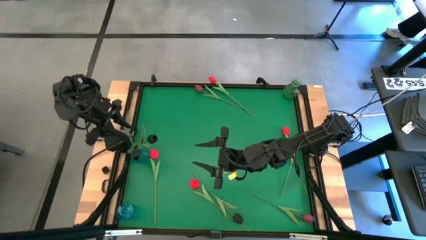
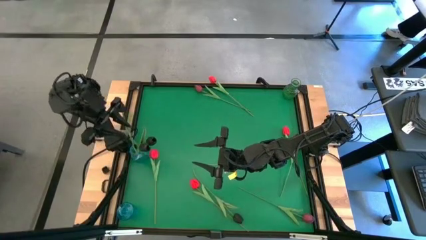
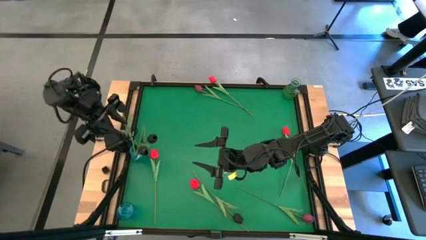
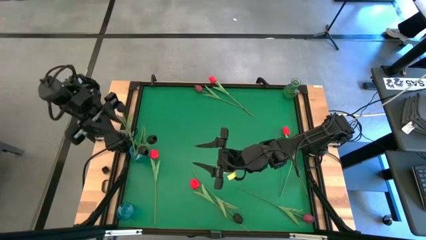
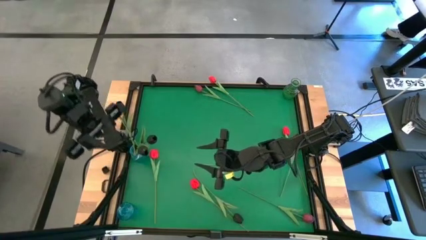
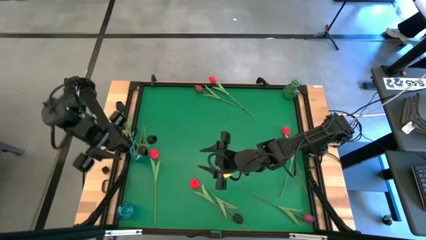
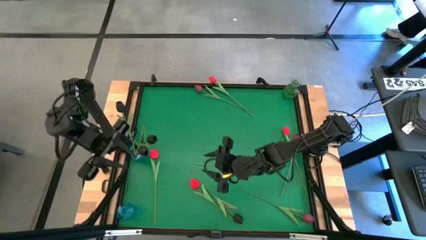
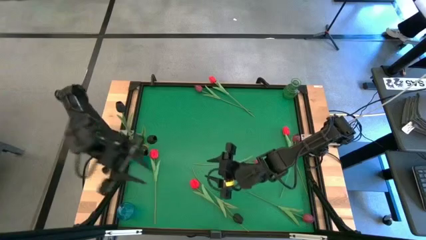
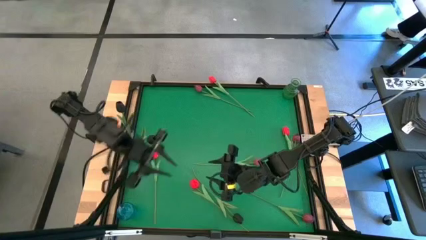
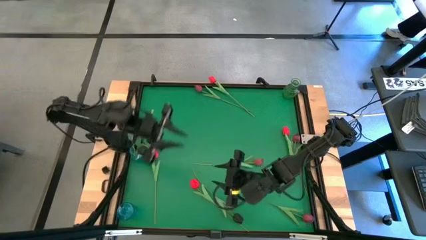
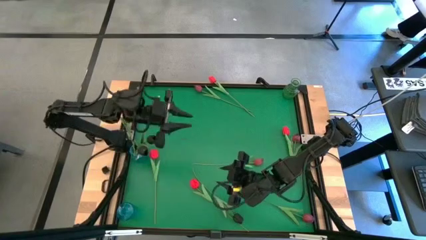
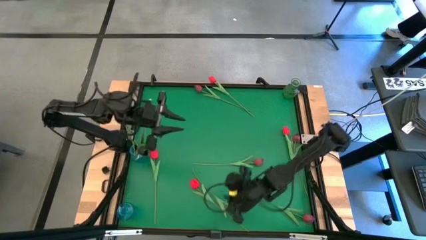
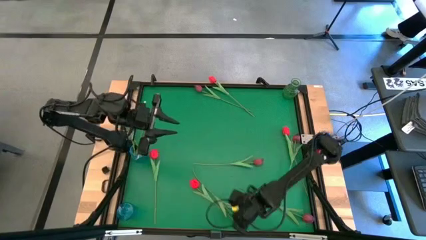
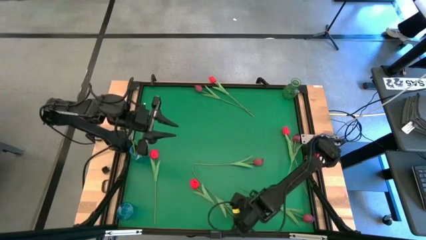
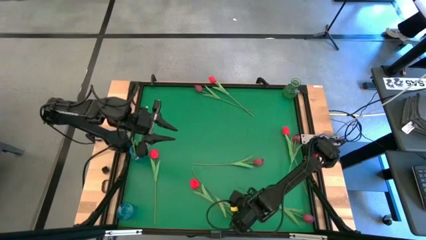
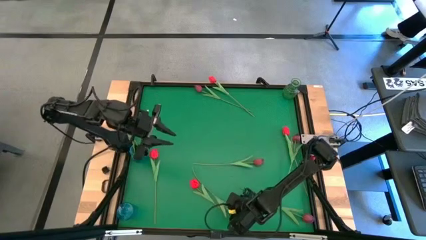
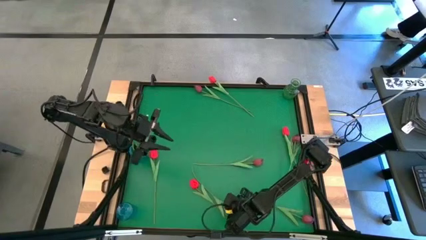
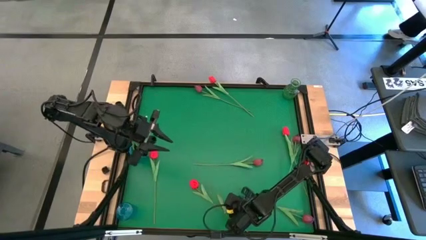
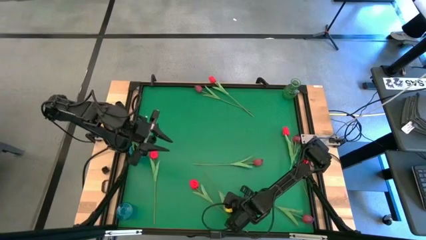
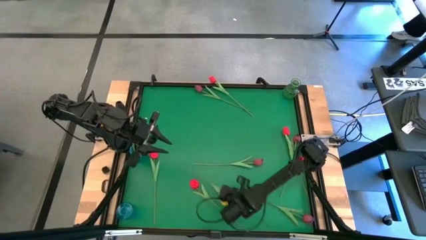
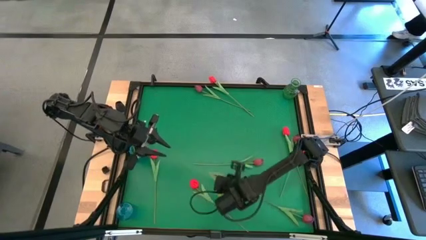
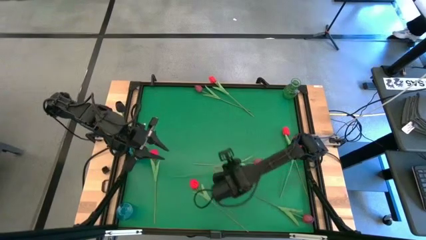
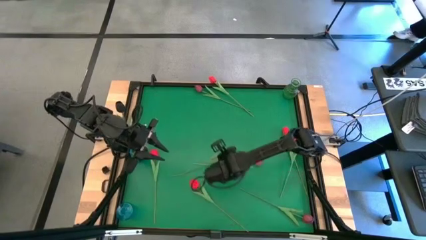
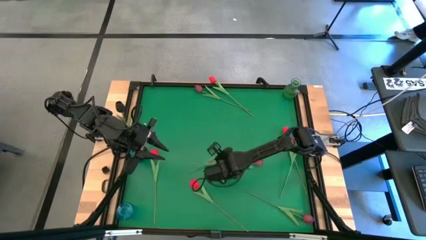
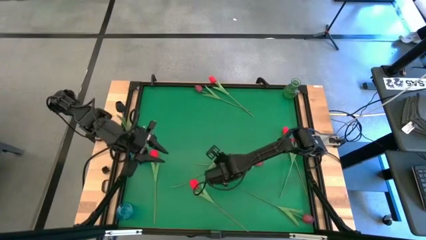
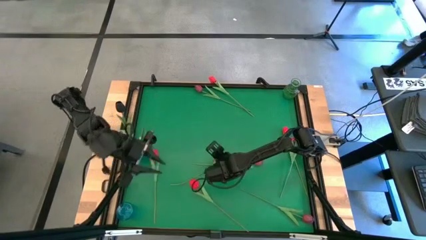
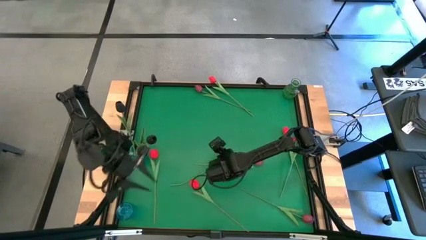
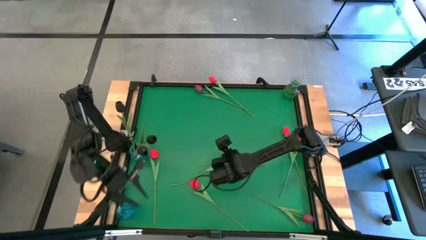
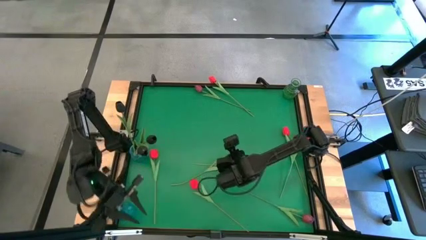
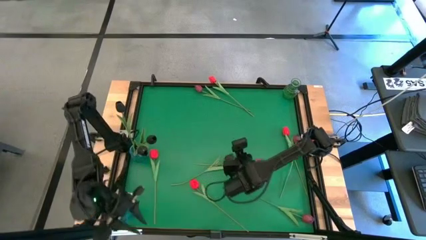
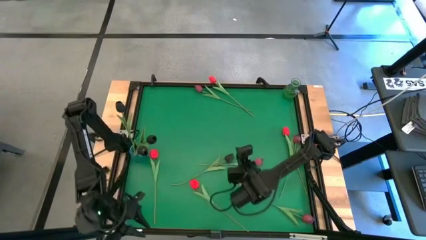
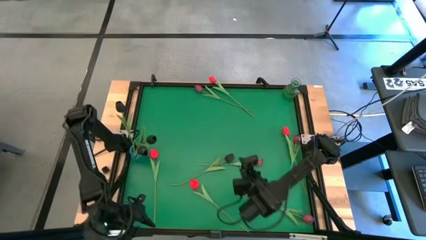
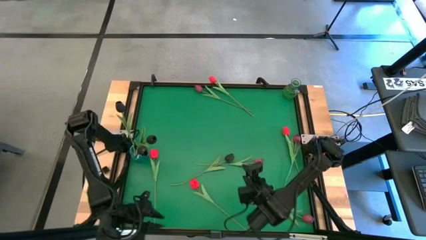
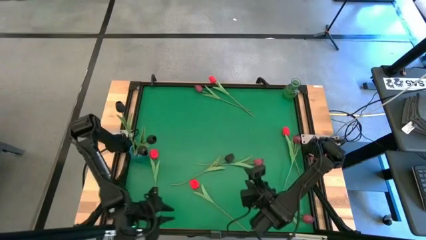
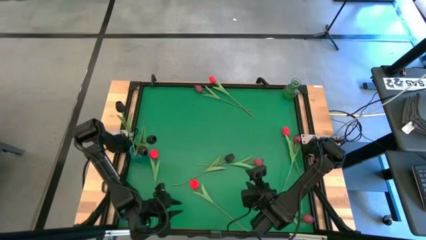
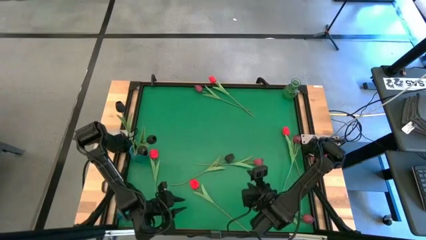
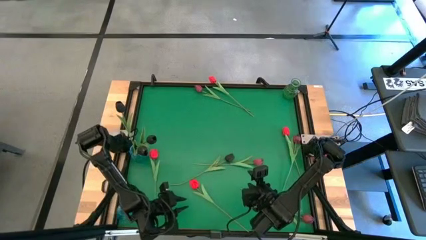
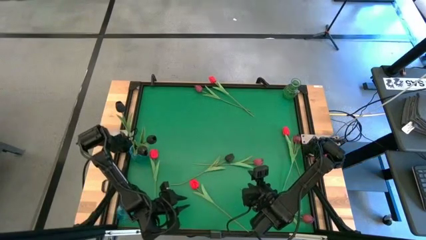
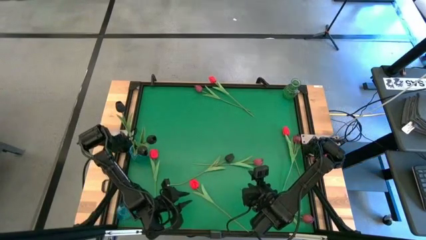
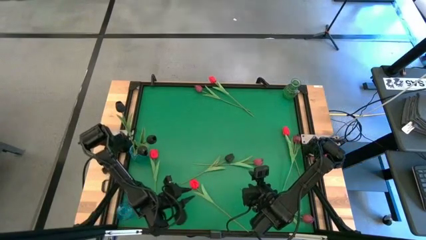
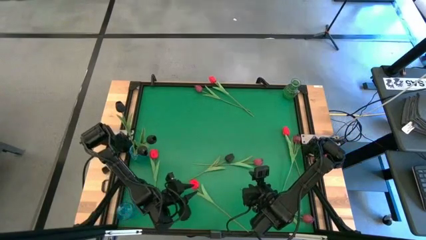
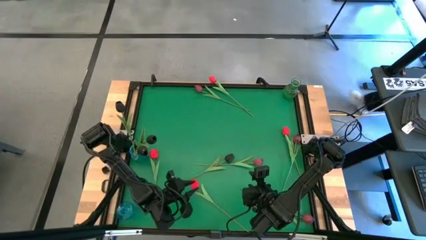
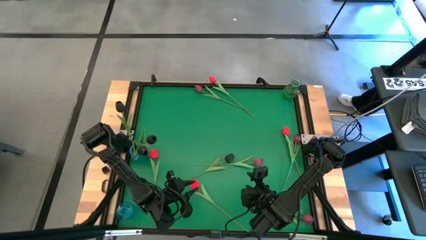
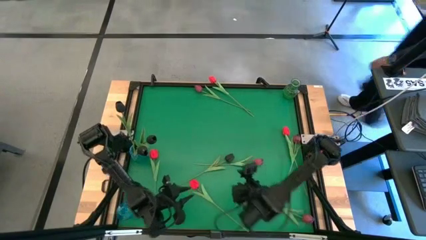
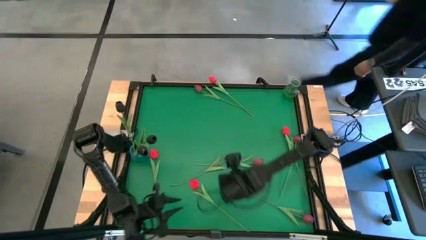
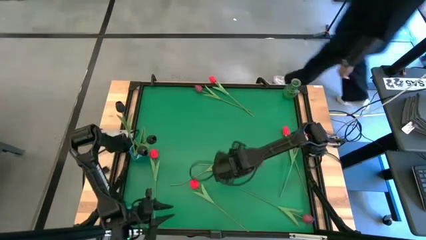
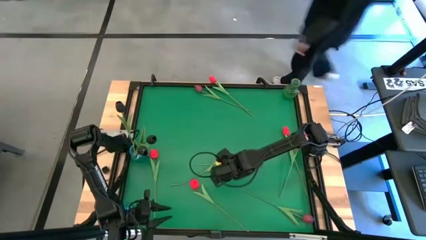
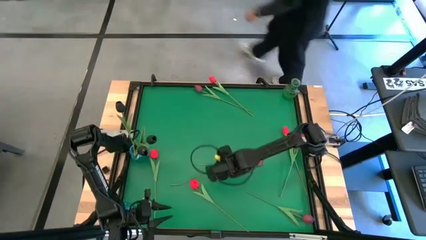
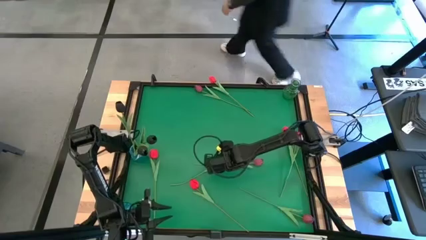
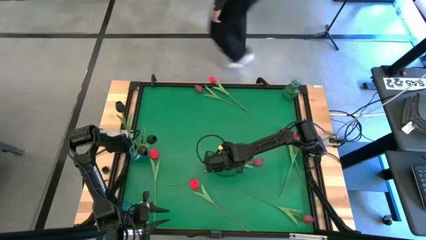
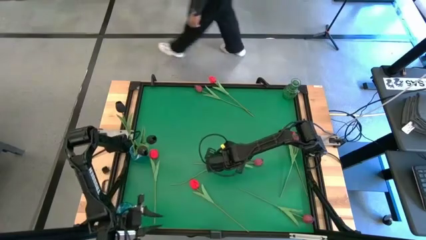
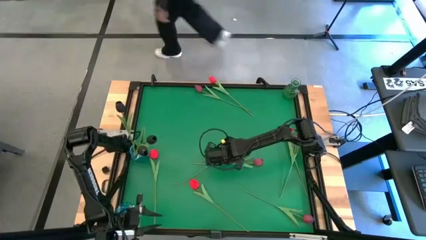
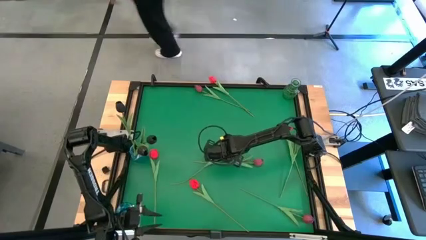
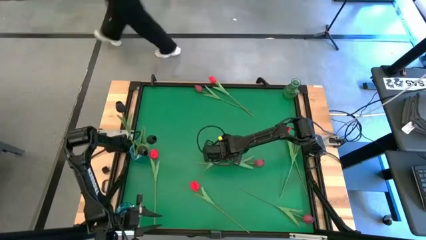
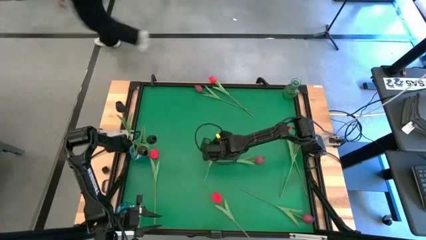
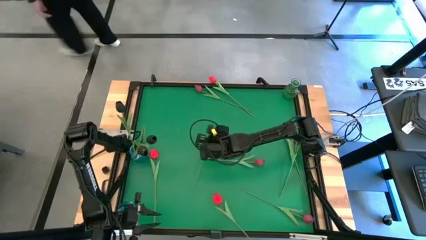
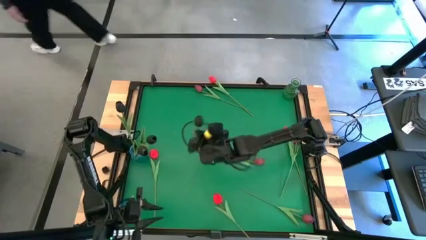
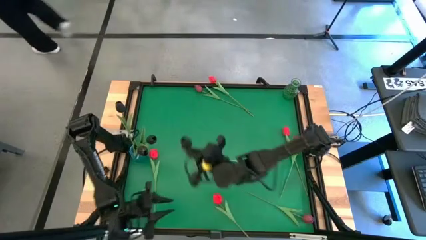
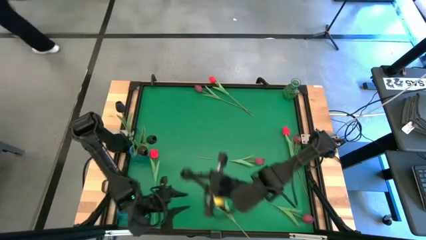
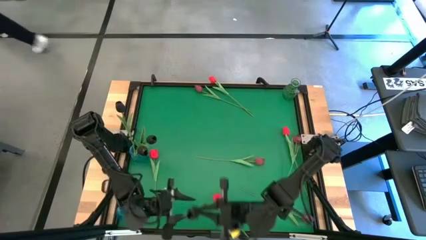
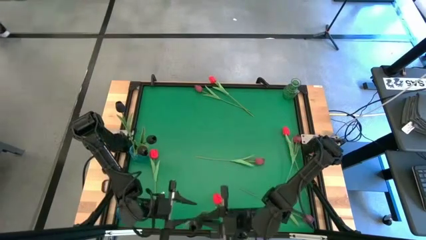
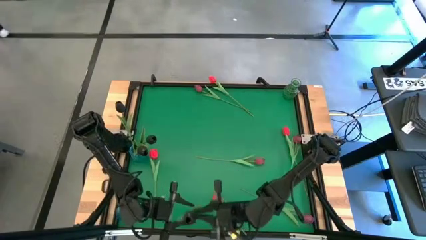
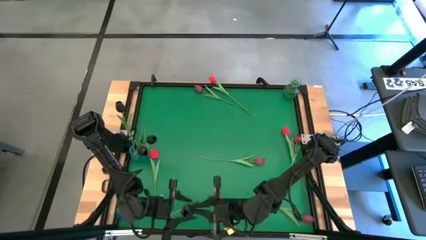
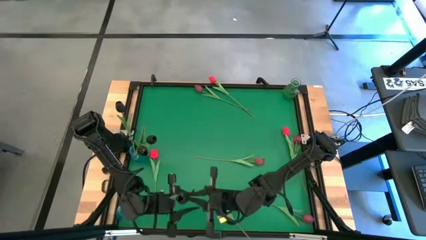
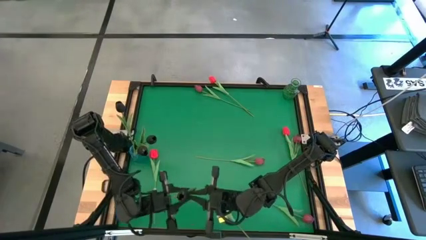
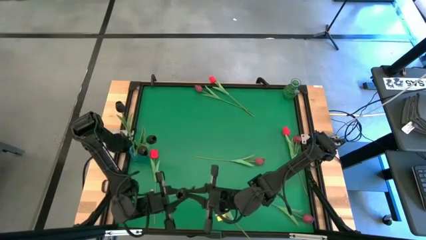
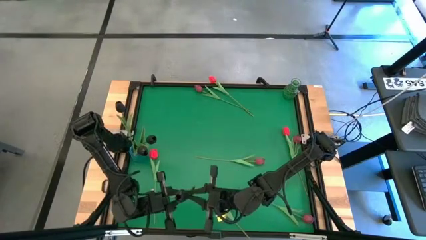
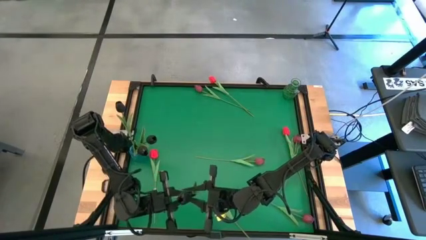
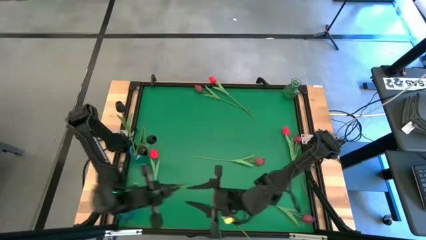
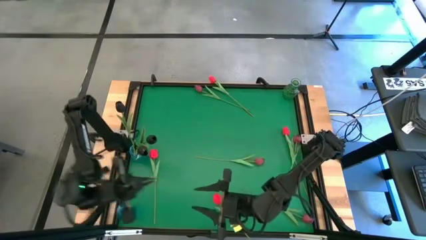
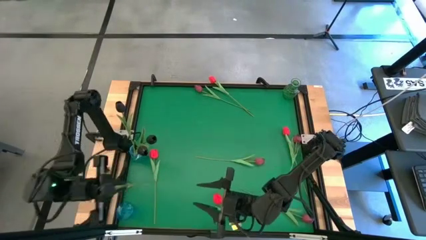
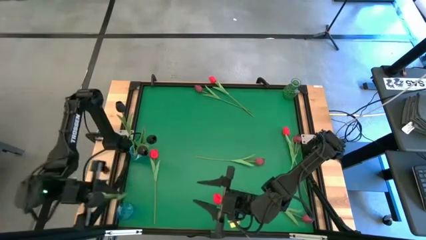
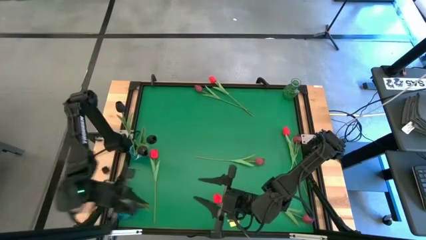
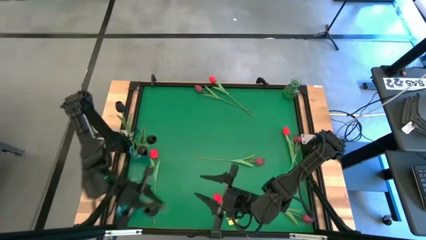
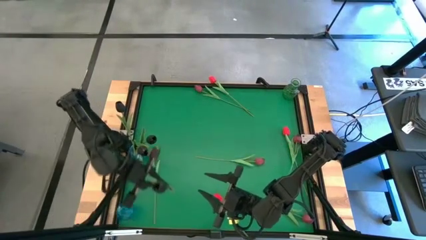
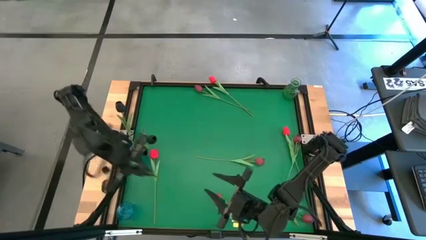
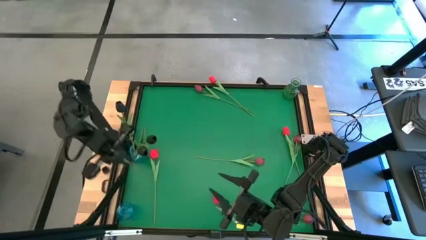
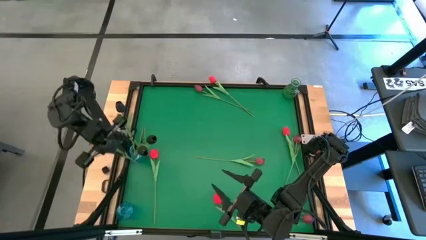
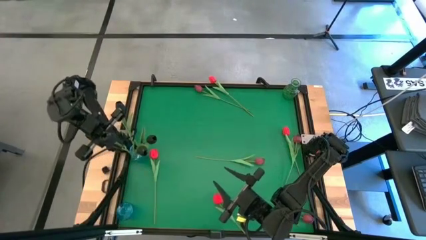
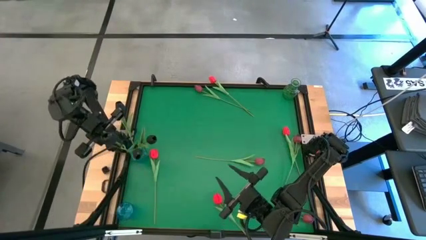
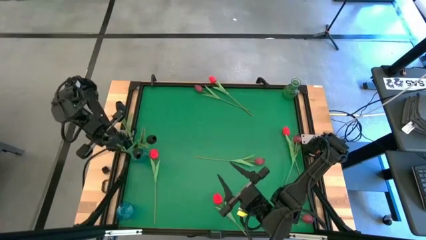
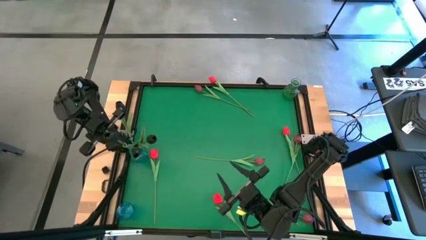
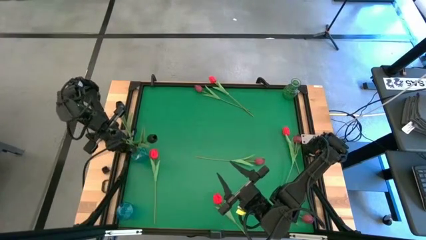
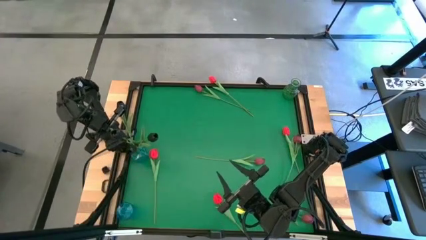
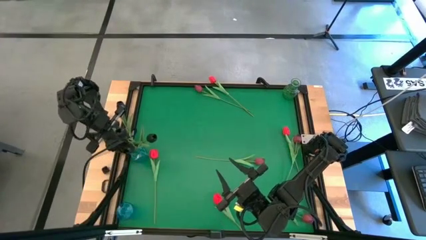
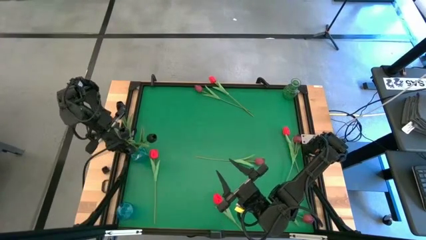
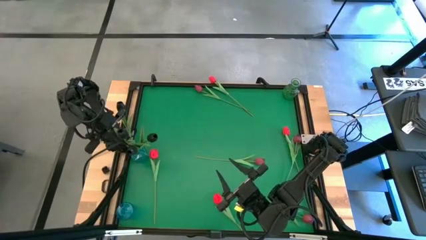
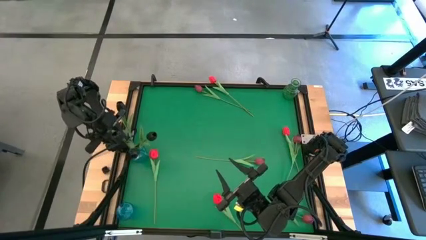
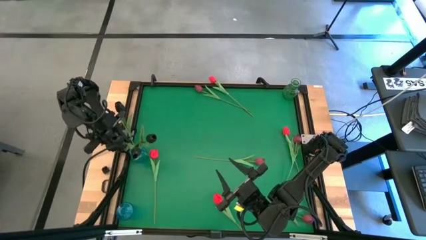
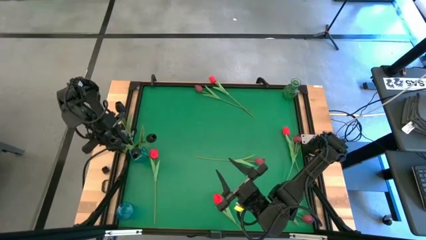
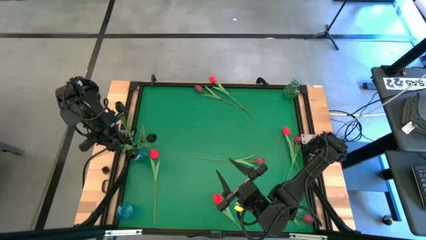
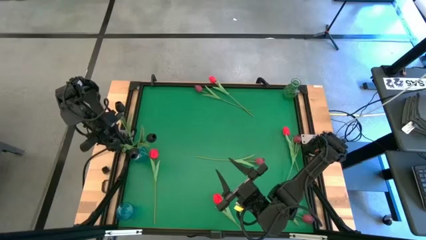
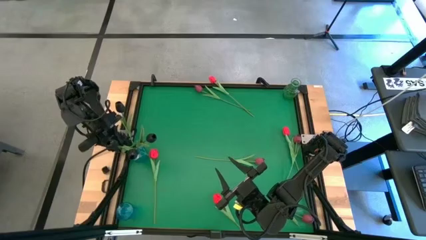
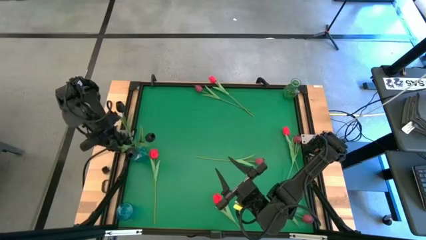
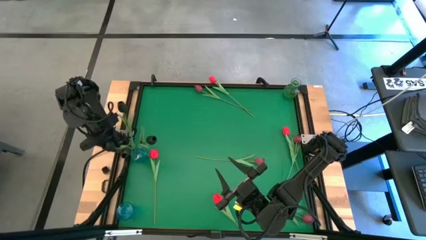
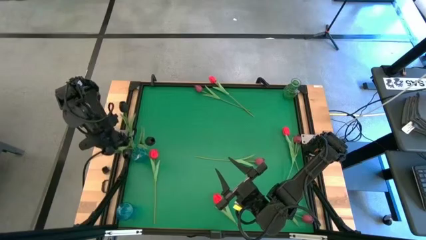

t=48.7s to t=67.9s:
Task: Sort flowers into vase by color
Put the black tulip into the blue vase
